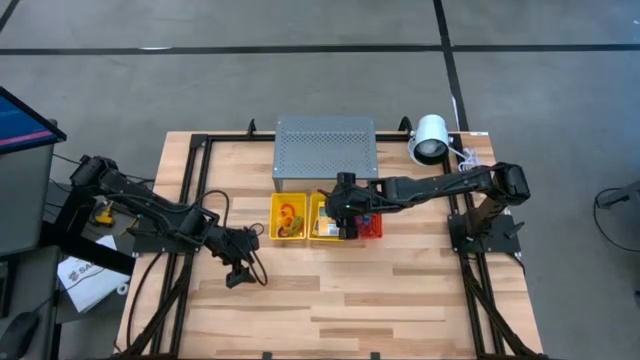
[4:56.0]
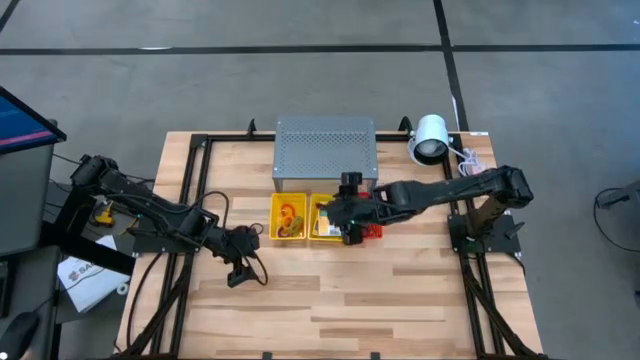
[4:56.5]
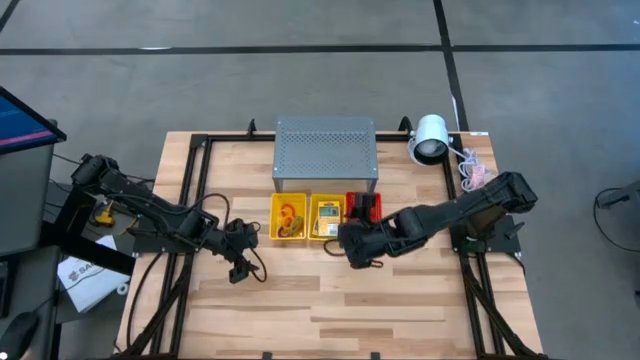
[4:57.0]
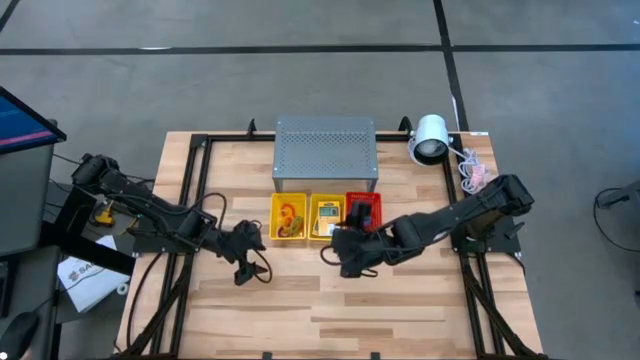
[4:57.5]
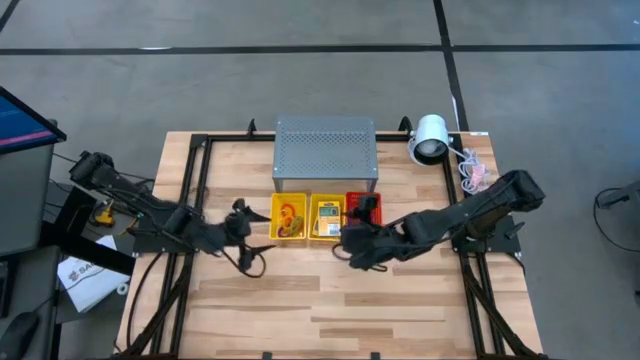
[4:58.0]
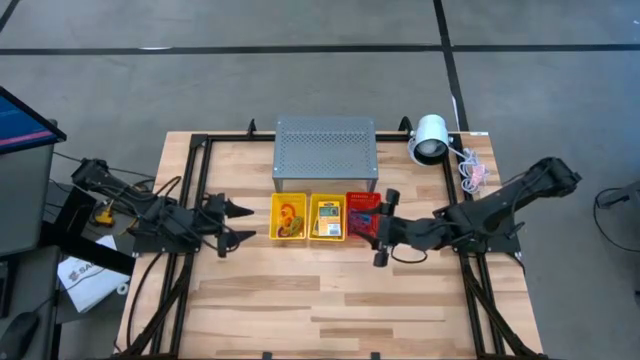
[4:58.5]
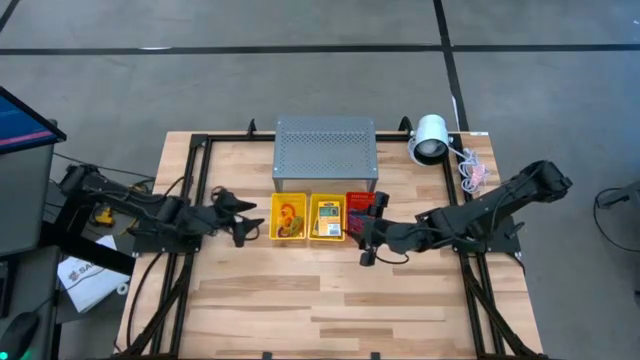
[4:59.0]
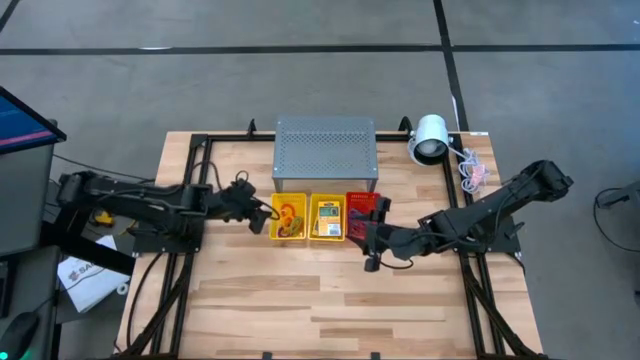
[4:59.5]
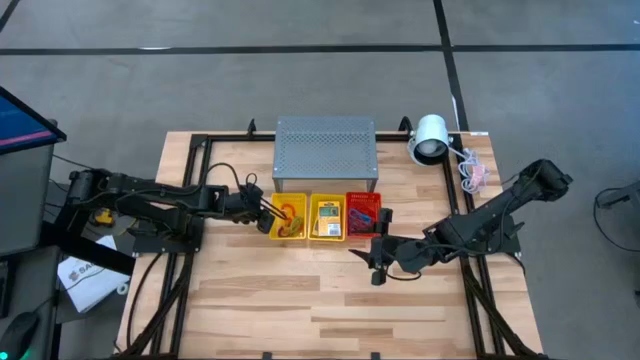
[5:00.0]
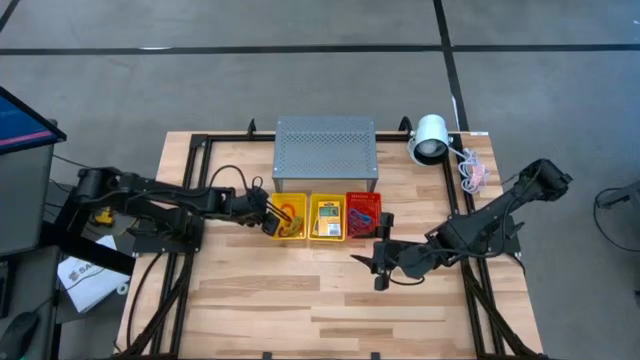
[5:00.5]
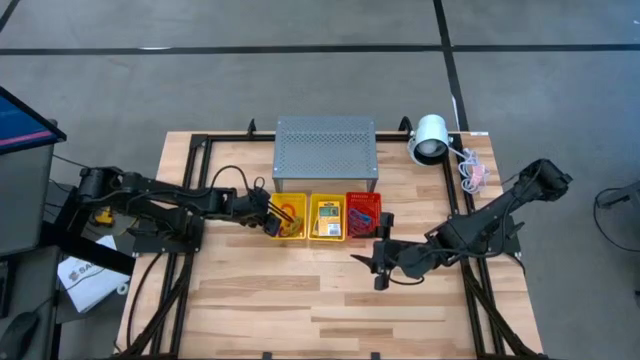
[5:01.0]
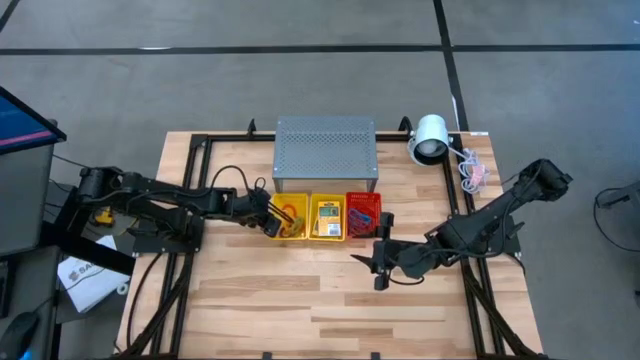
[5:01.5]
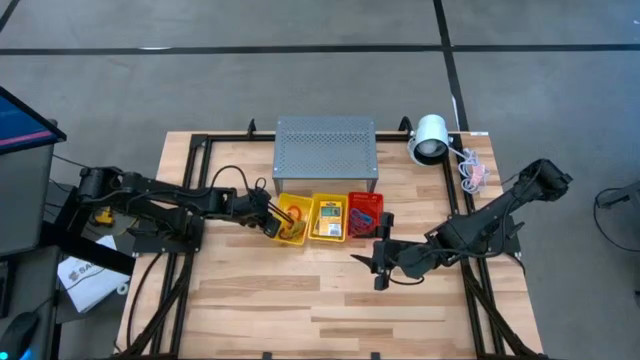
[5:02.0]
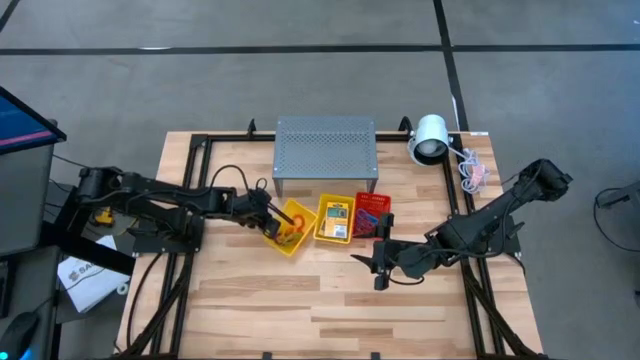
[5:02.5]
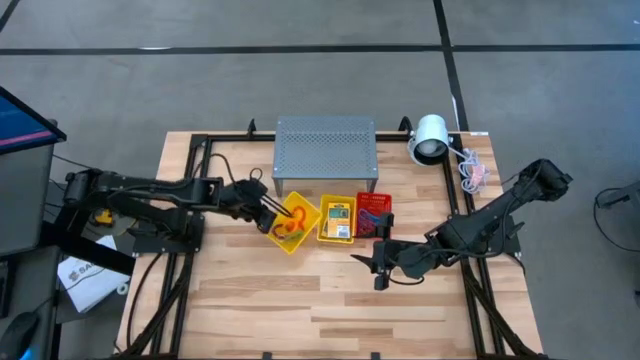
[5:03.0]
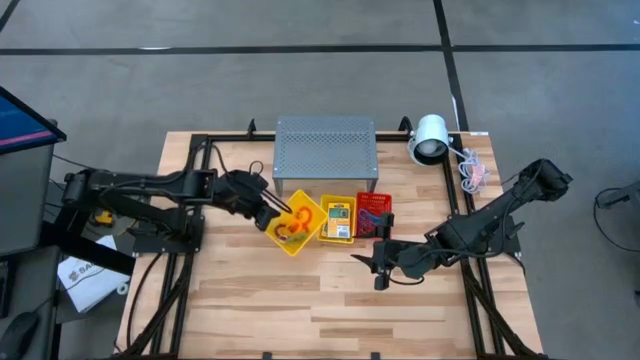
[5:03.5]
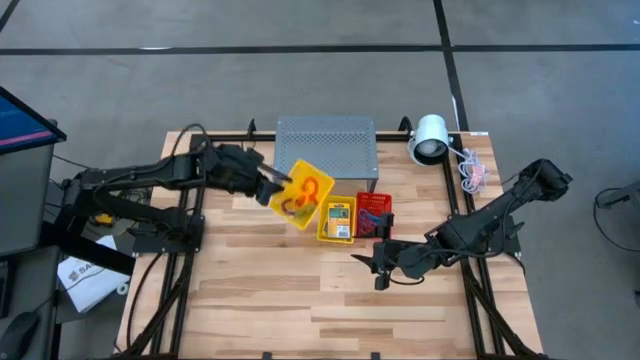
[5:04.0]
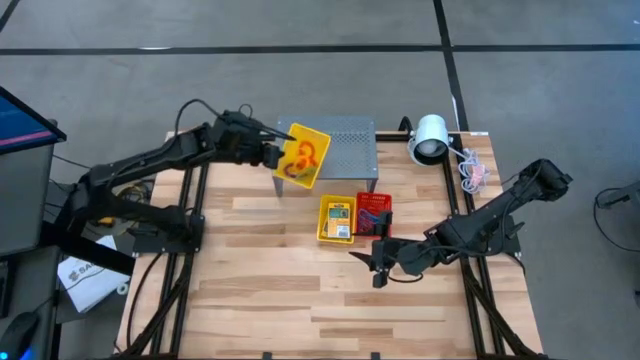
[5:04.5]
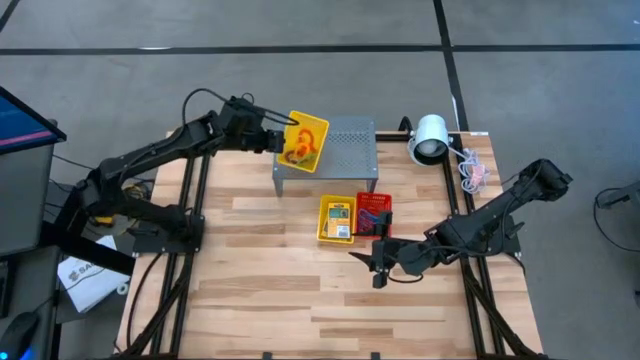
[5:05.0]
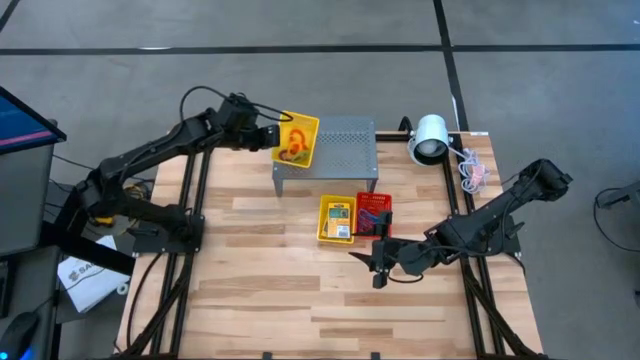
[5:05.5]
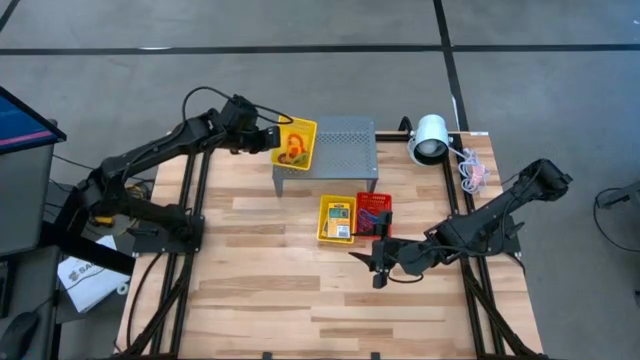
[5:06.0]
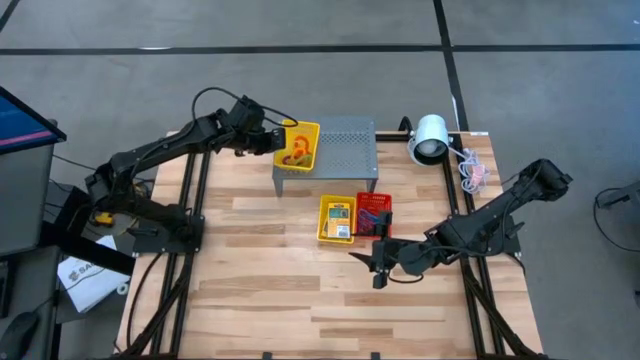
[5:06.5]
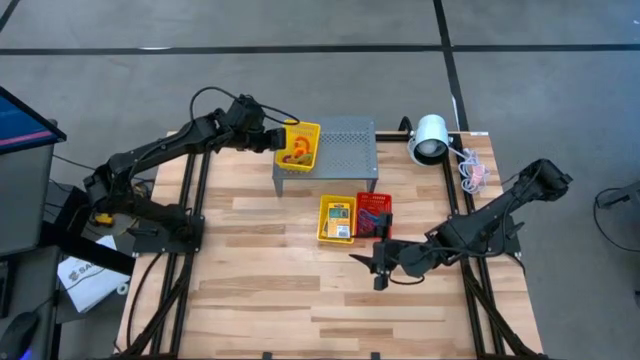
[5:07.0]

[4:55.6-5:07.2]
Task: Pick & Place Office Desk Supplies
Put the left yellow bin on the shelf

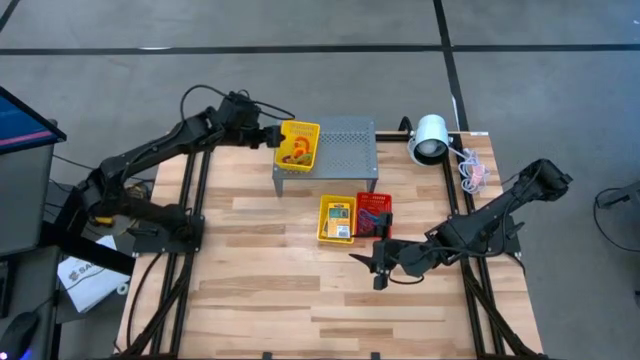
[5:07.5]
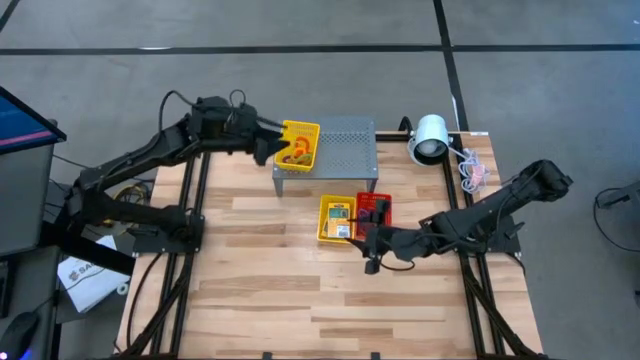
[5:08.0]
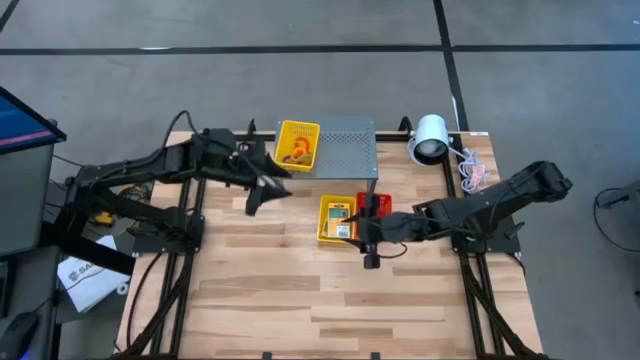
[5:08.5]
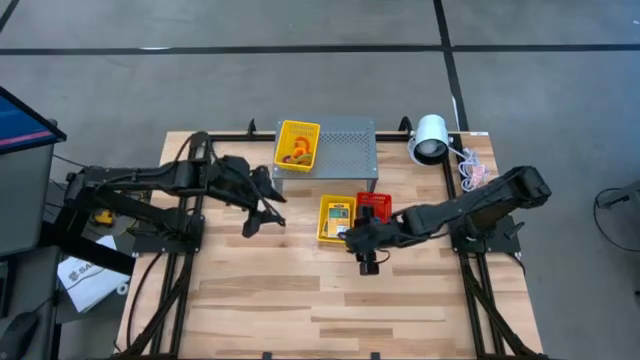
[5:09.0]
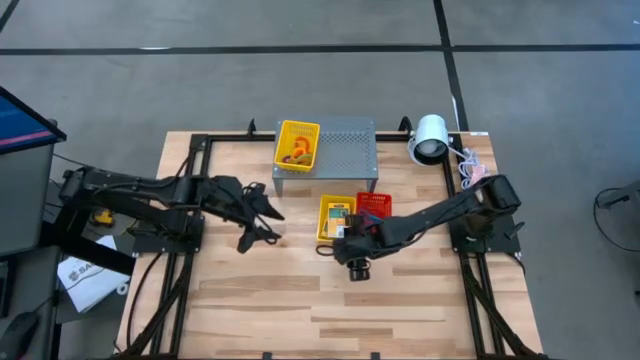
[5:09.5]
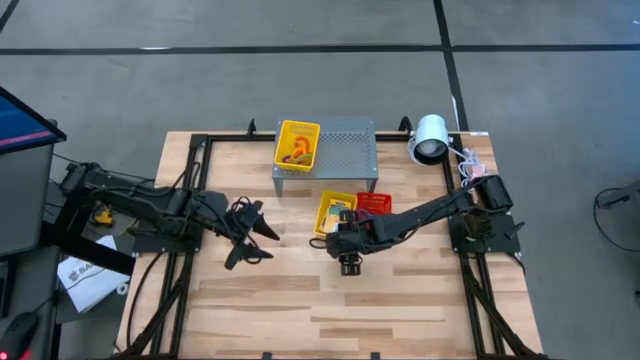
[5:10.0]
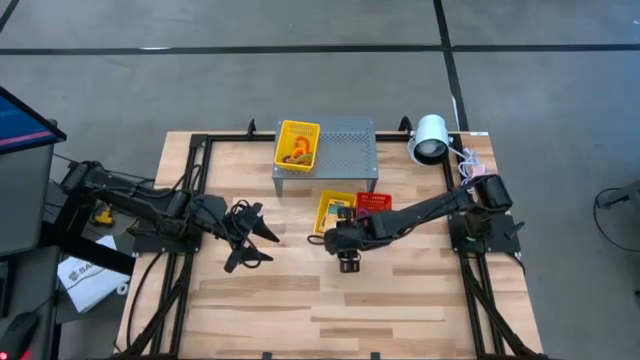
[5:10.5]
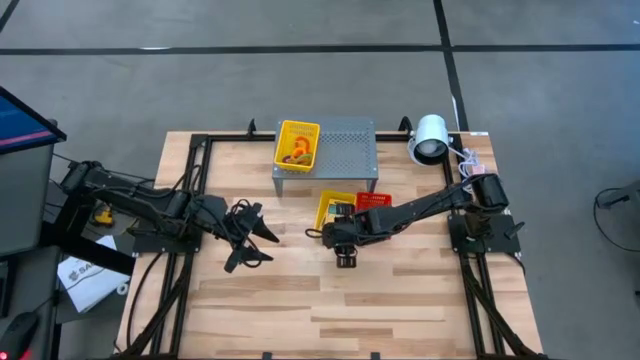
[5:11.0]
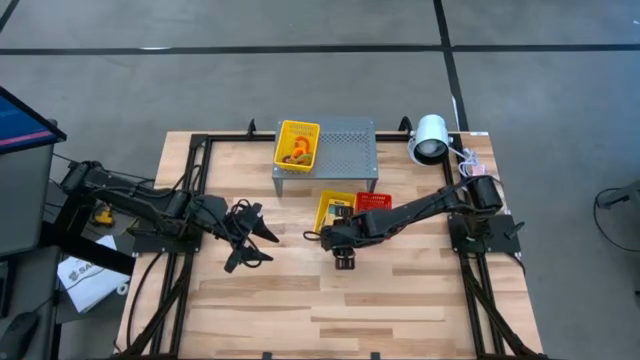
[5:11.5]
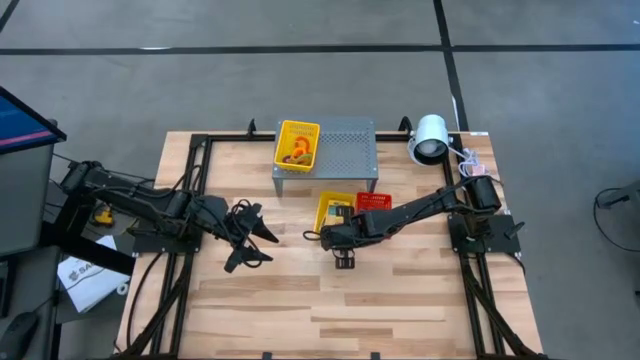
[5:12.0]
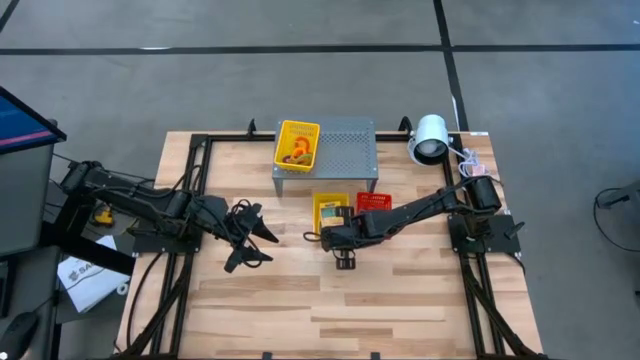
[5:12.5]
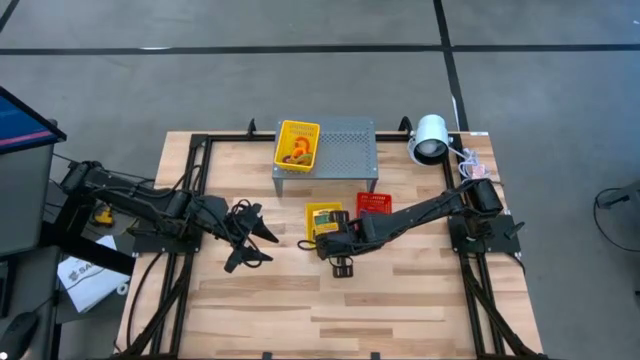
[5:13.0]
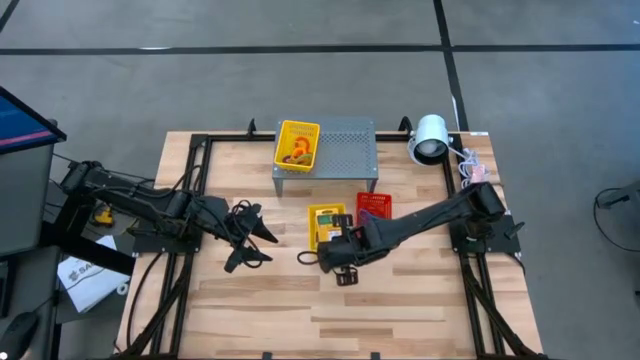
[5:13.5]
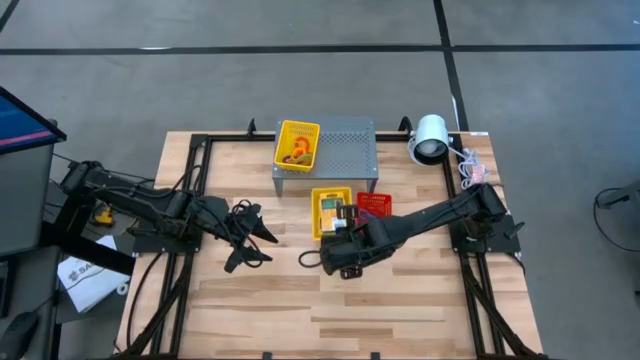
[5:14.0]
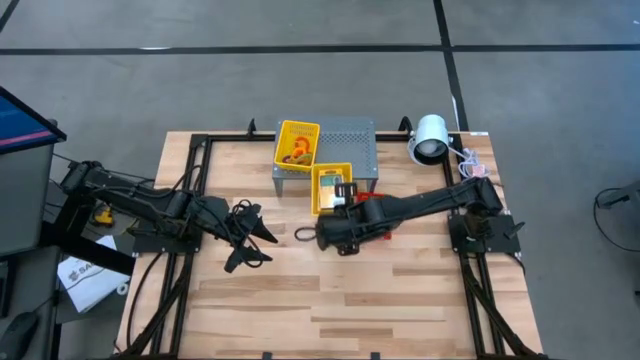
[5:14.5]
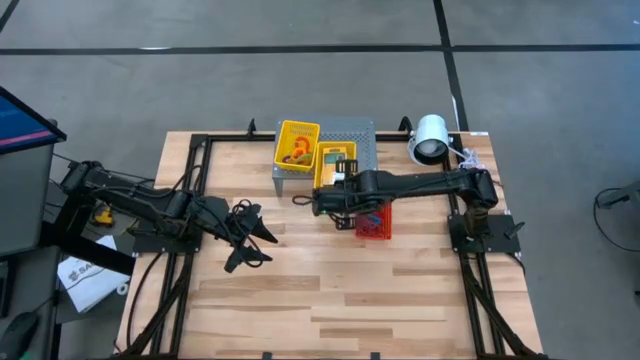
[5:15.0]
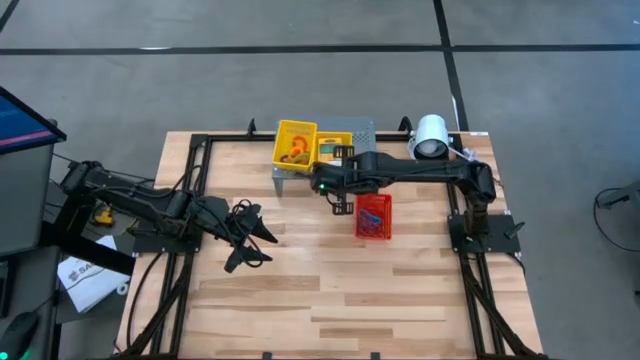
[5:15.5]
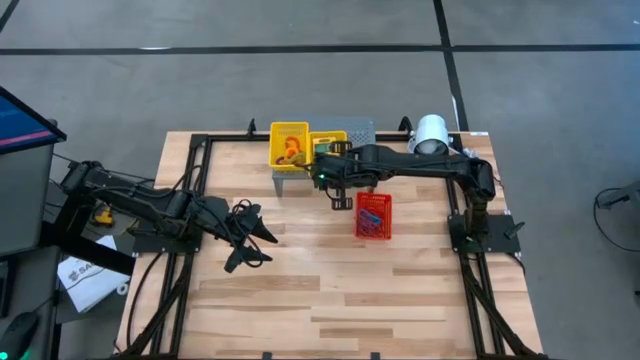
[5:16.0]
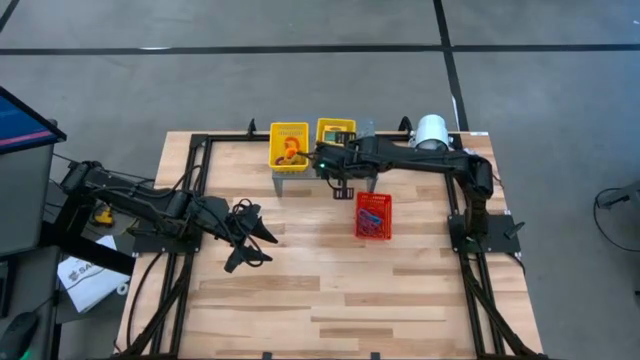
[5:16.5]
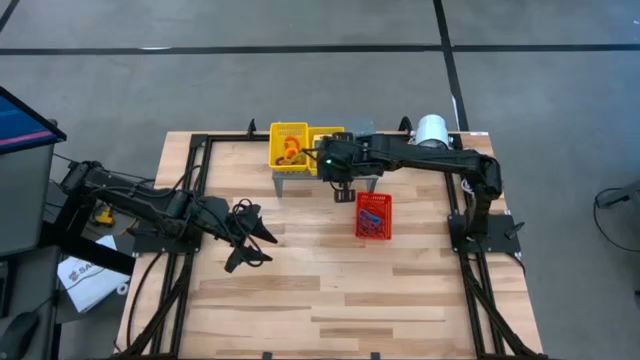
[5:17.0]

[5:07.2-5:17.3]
Put the yellow bin on the shelf
